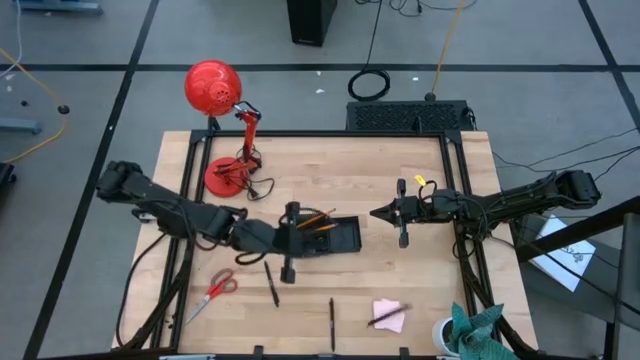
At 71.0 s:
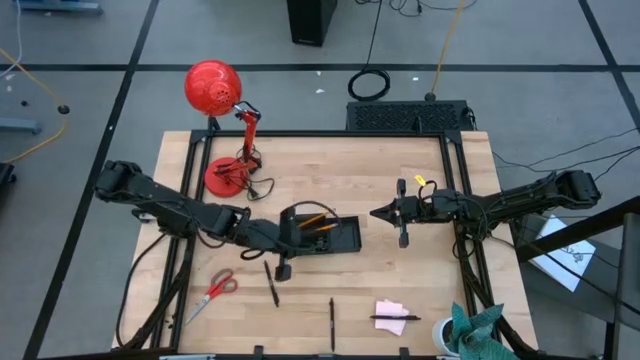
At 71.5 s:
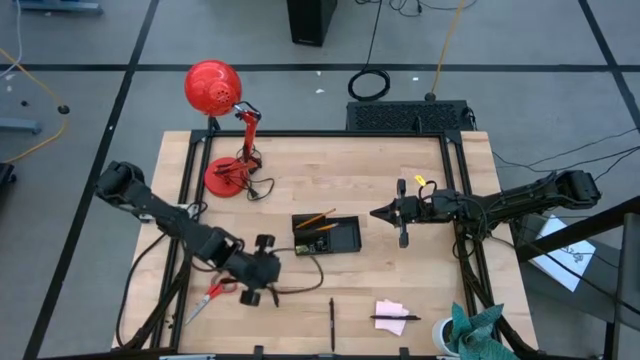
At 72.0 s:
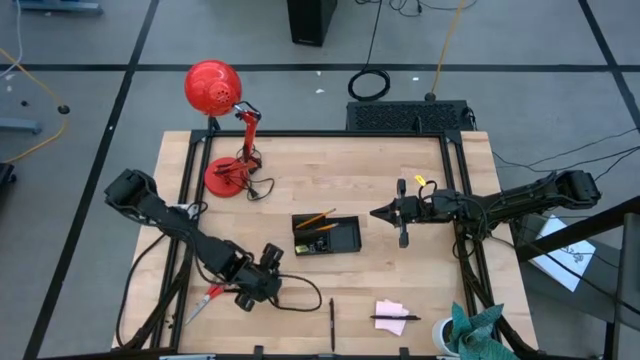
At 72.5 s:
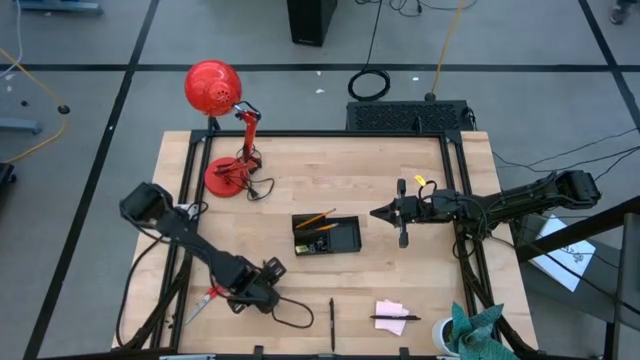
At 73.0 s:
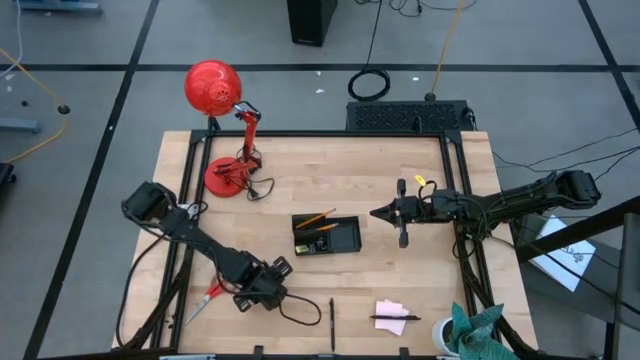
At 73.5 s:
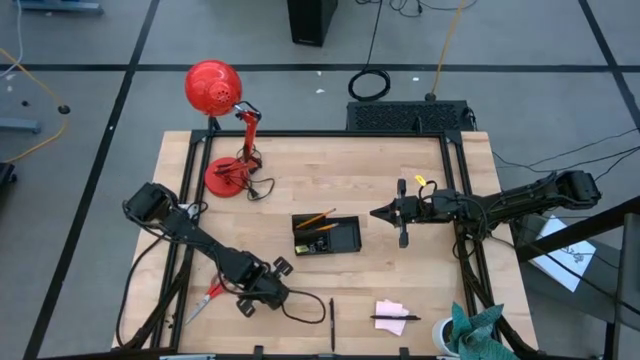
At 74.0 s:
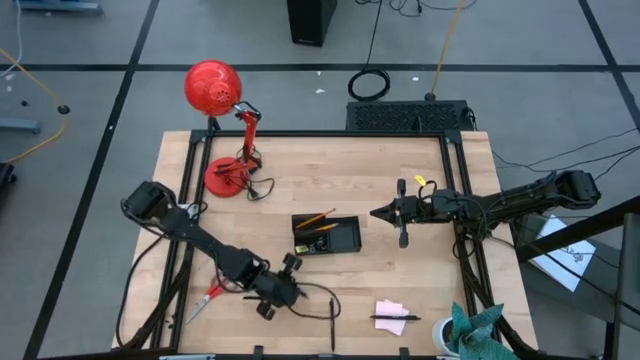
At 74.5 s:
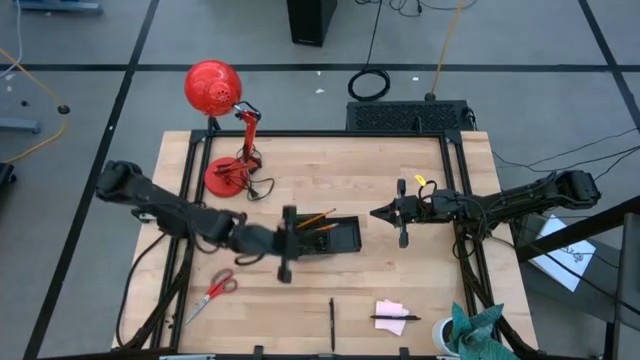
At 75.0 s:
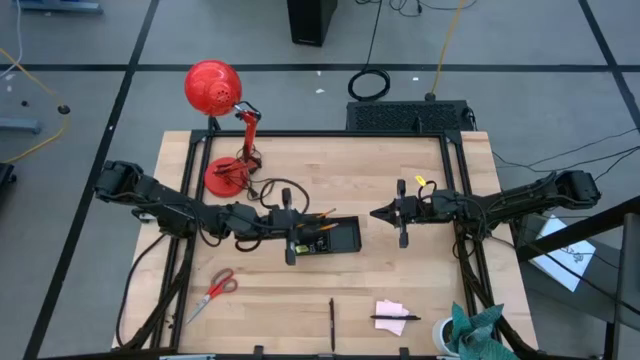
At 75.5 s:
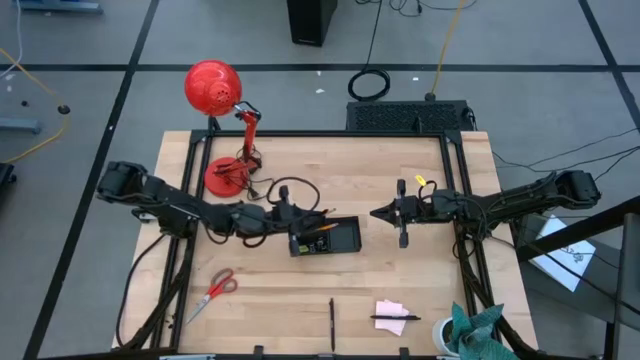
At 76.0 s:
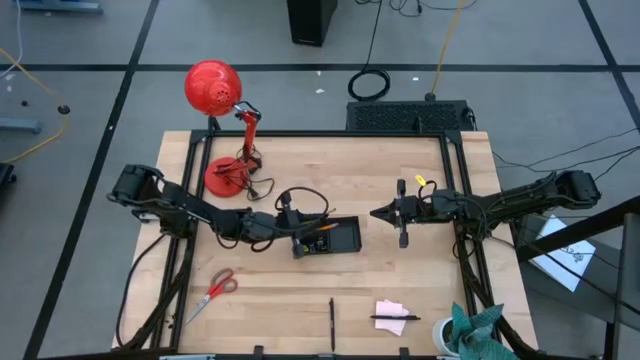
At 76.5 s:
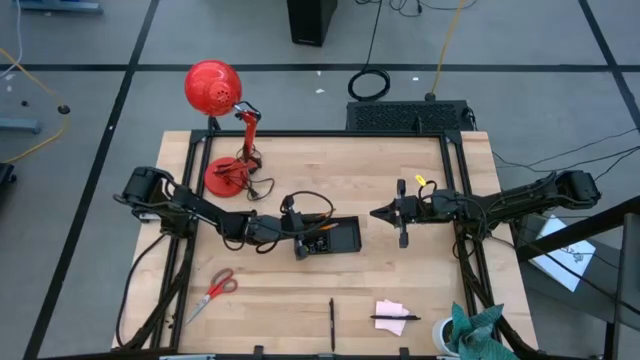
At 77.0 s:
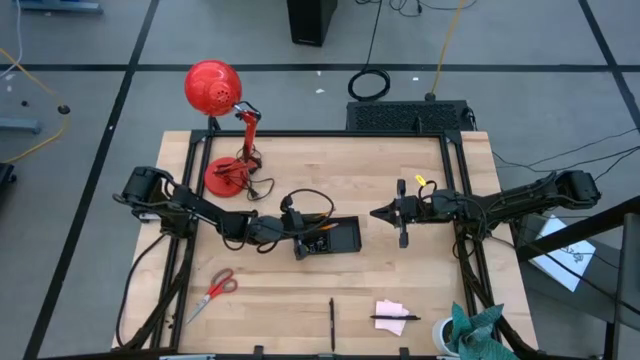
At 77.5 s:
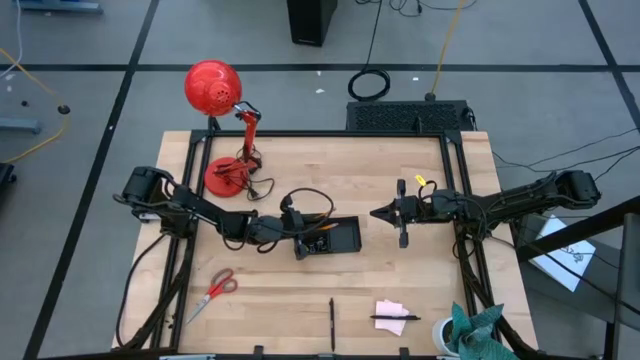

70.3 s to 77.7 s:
Task: Pick and place office supplies into organizer
Put the left pen into the desk organizer

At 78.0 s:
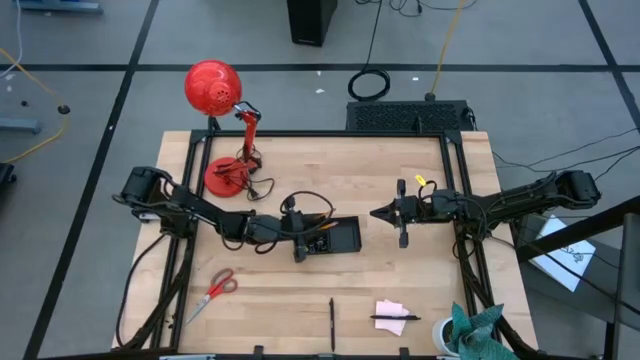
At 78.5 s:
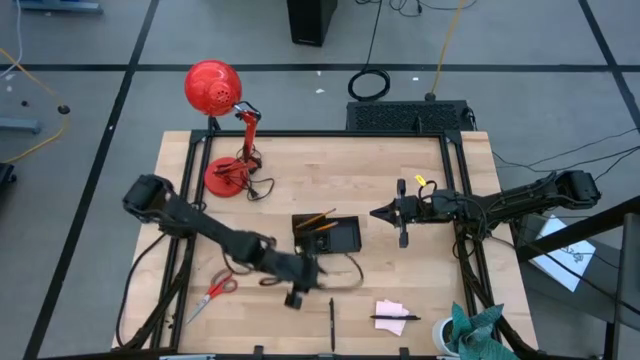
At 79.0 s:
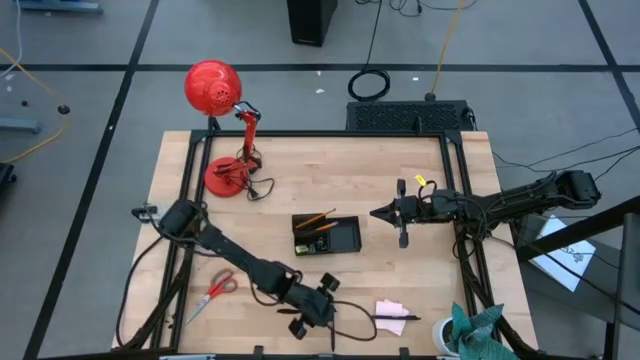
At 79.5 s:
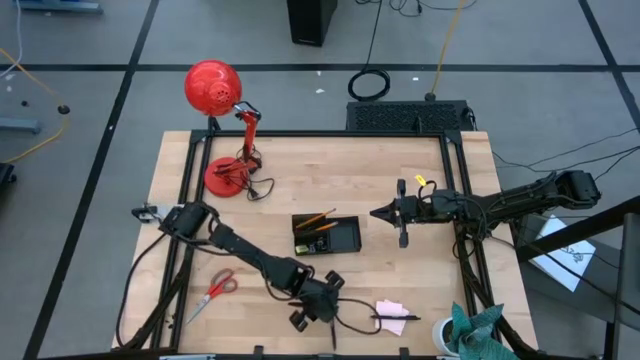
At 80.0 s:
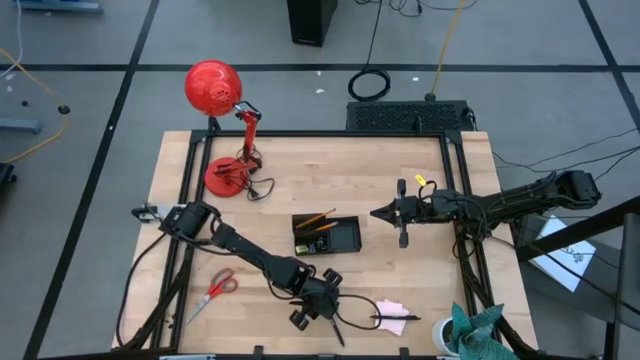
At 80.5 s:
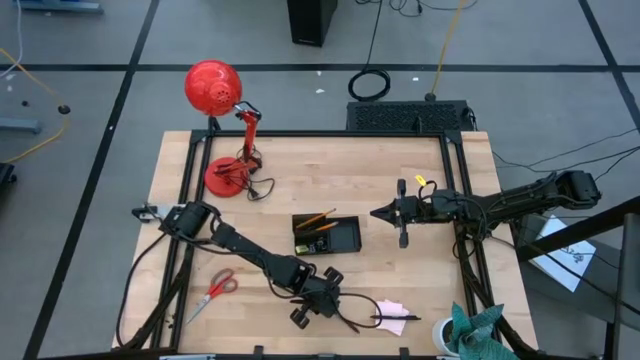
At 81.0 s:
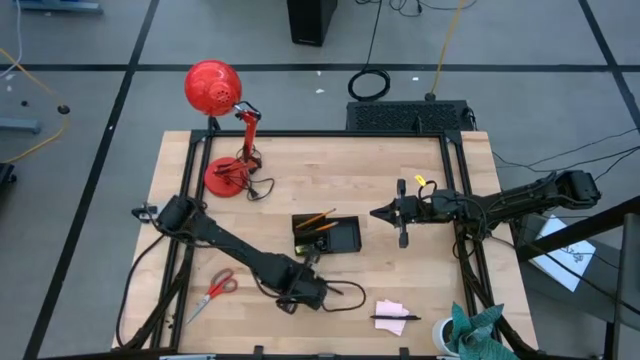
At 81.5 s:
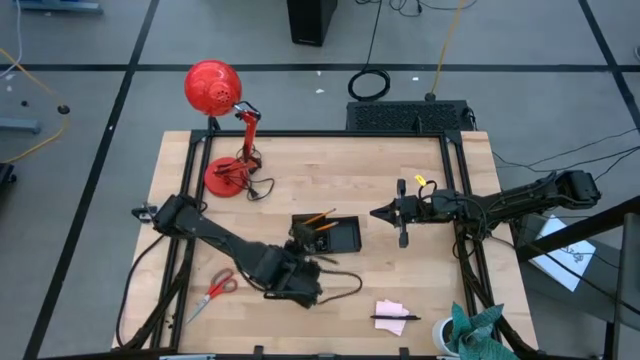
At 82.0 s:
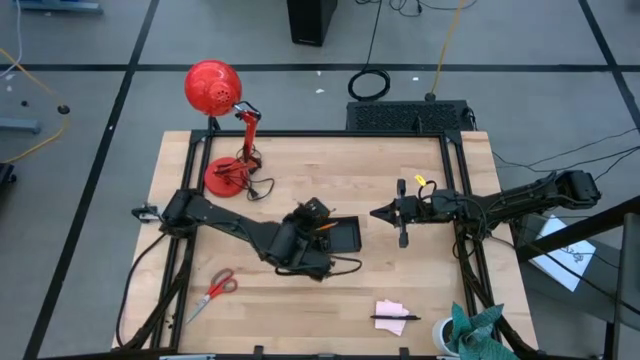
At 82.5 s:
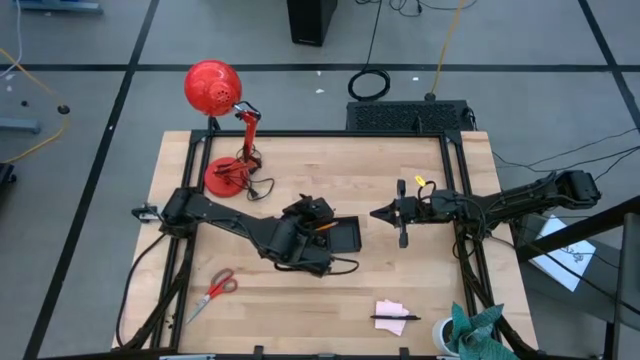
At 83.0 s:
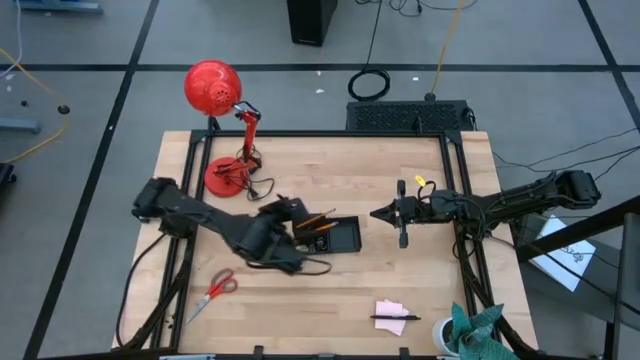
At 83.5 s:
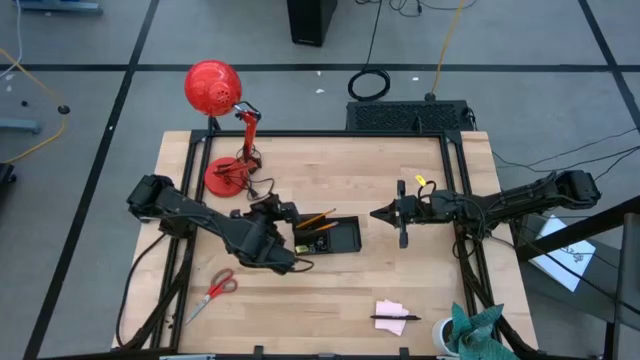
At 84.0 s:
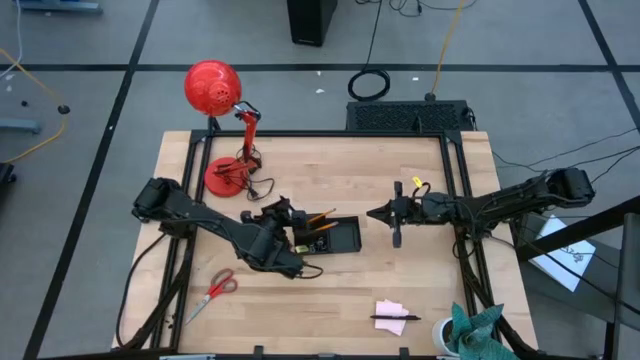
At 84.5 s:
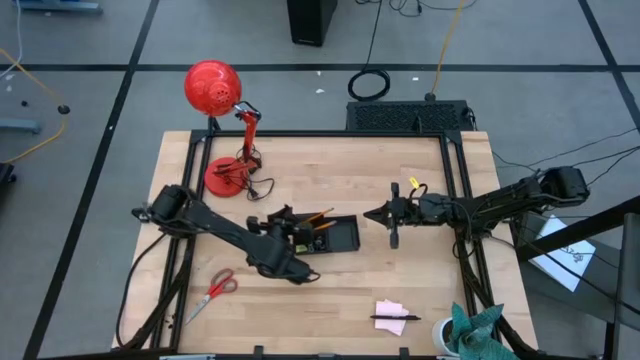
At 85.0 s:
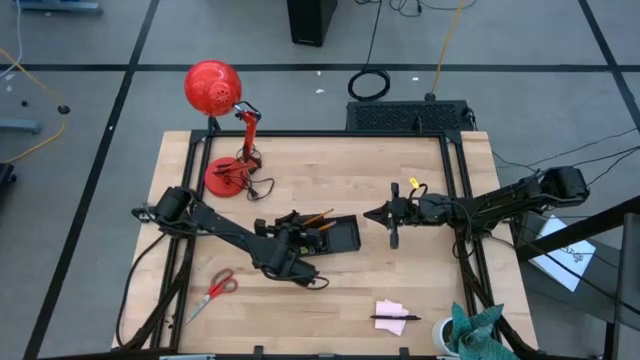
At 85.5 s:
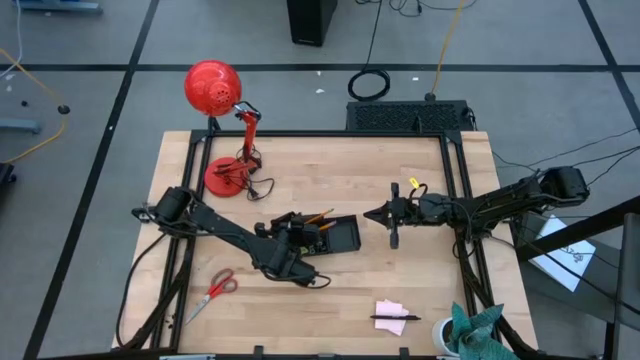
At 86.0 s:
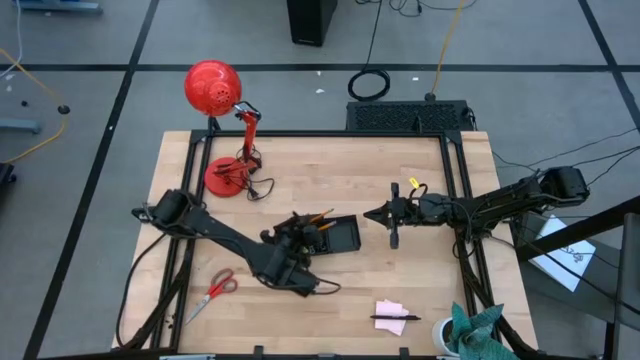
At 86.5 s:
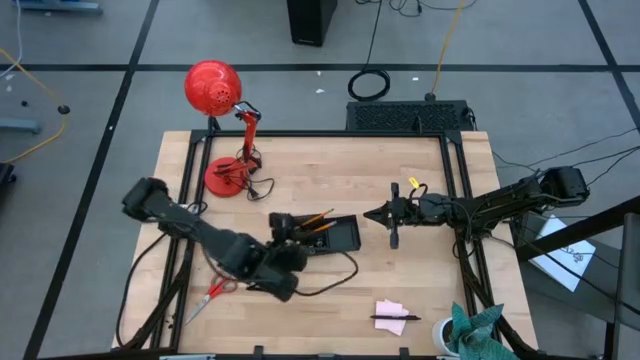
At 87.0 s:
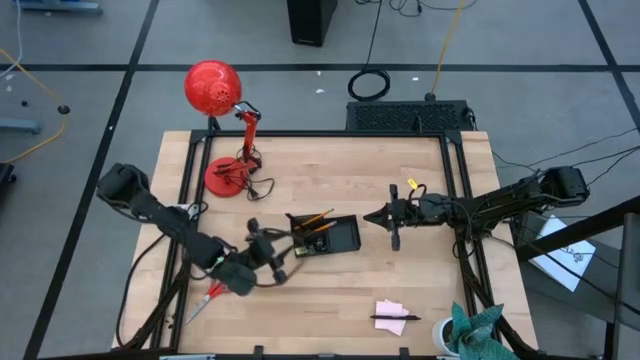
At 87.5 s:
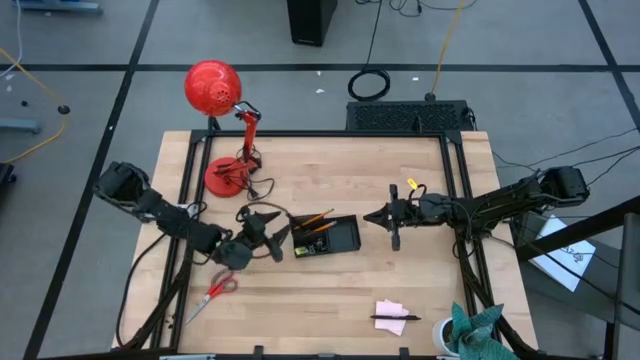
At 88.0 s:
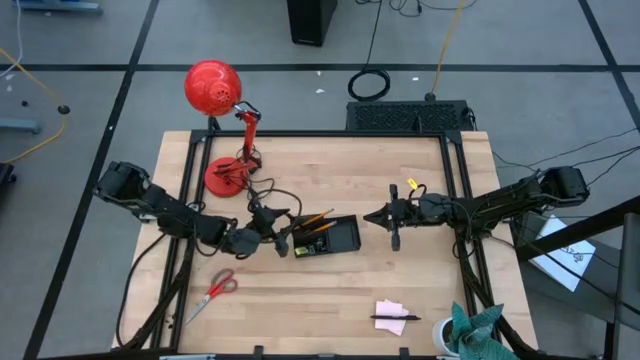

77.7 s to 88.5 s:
Put the left pen into the desk organizer

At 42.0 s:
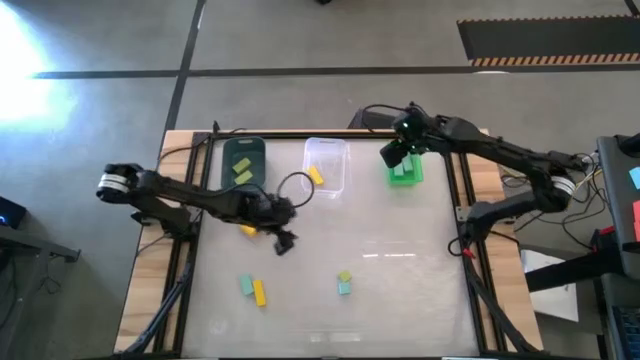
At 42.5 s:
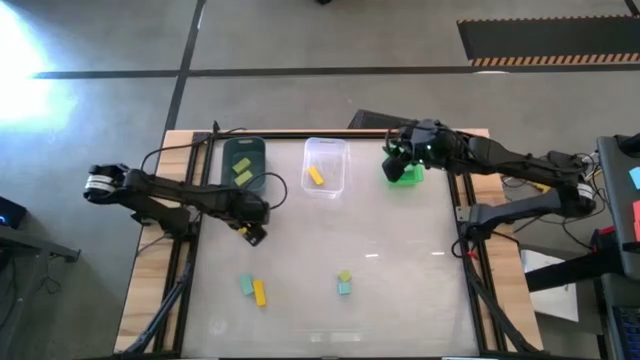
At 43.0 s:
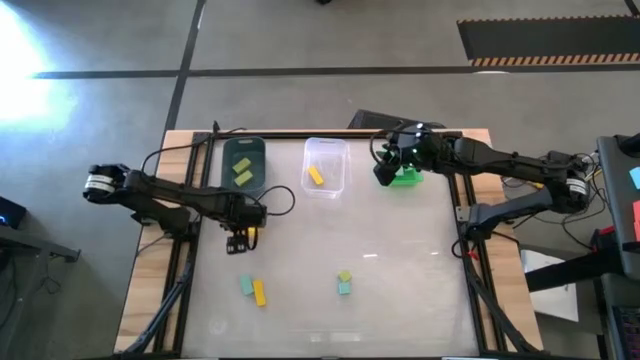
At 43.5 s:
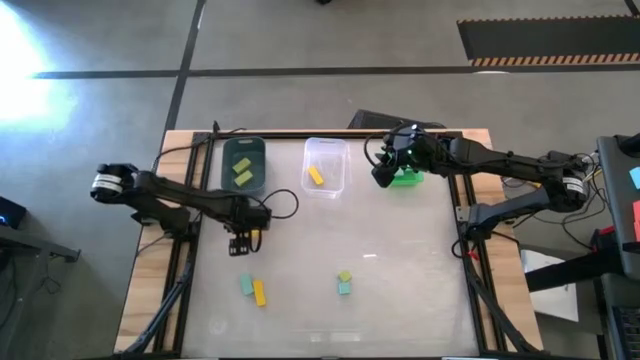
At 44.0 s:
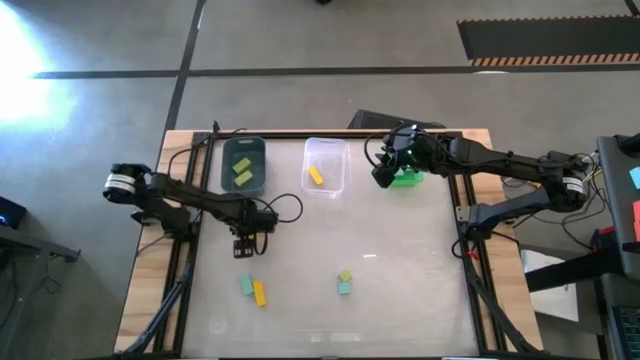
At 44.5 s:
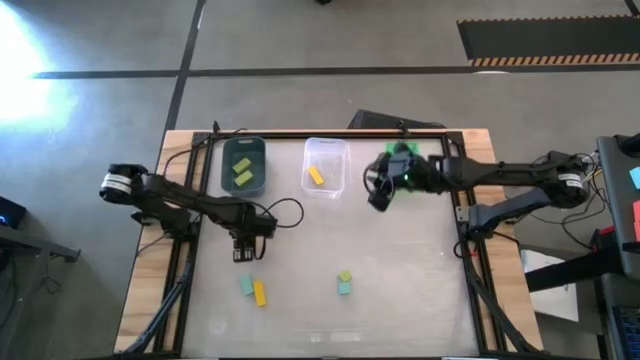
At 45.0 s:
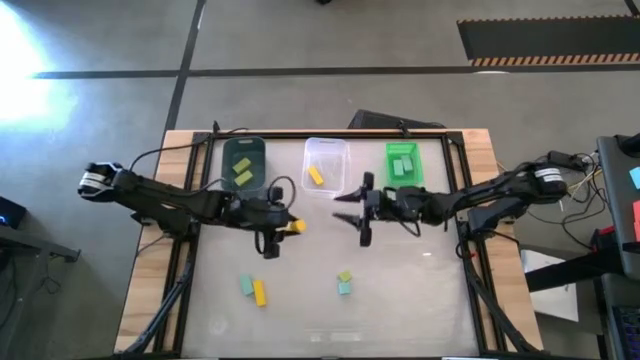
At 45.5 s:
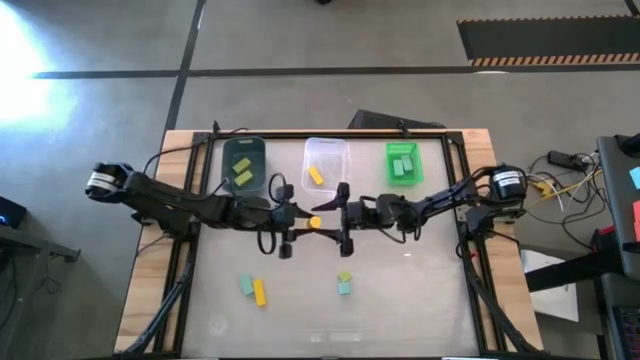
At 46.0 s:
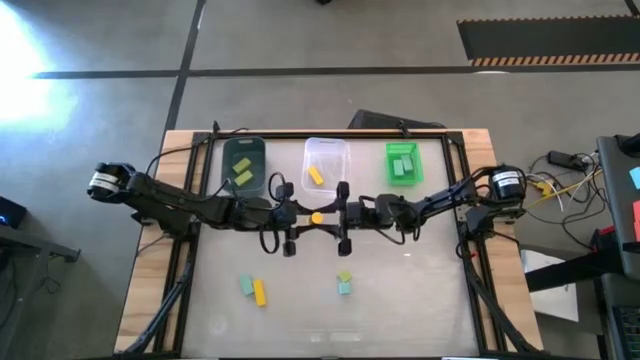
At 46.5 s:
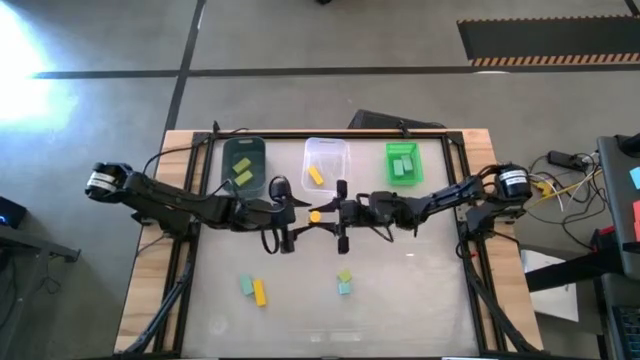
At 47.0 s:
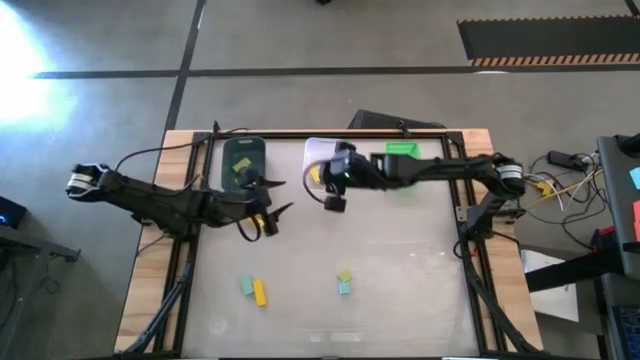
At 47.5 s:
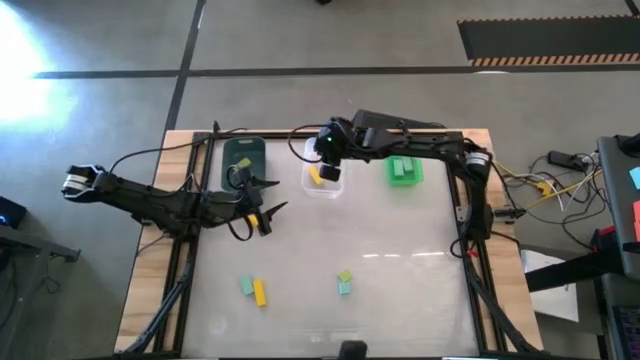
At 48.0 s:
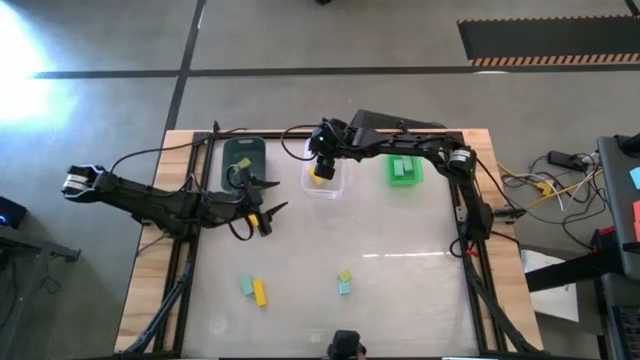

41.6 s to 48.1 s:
Task: Sort & place blocks by color
Put the yellow block into the transparent bin
